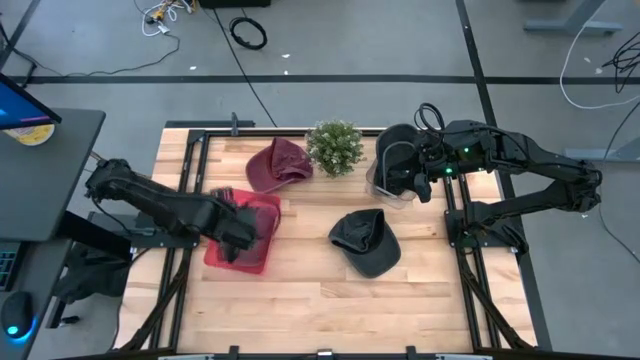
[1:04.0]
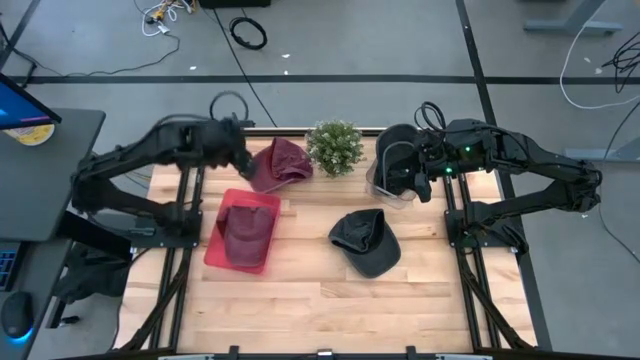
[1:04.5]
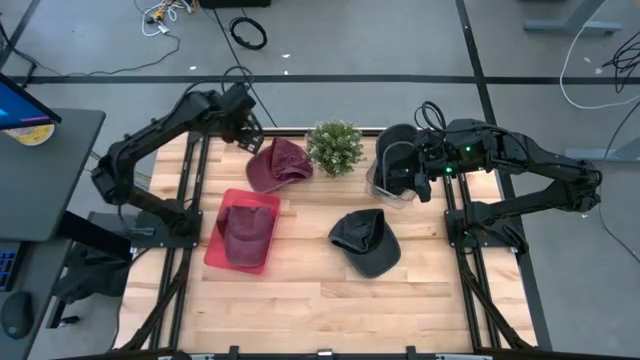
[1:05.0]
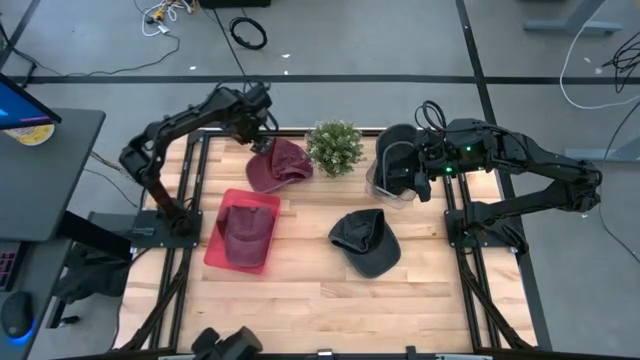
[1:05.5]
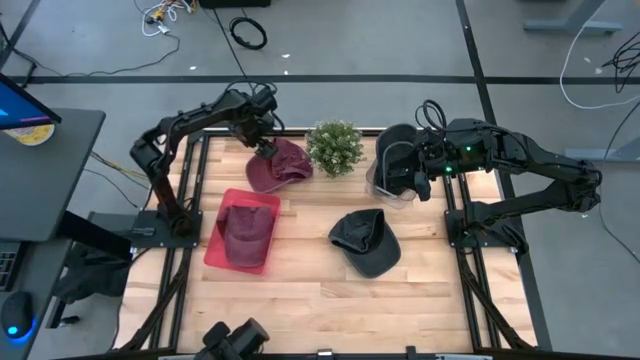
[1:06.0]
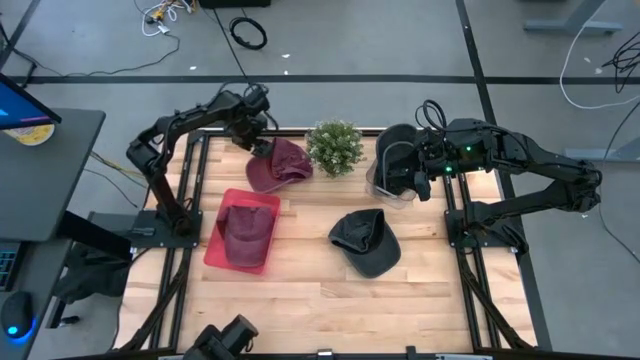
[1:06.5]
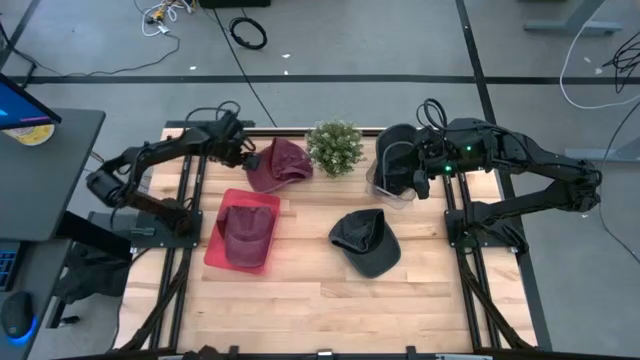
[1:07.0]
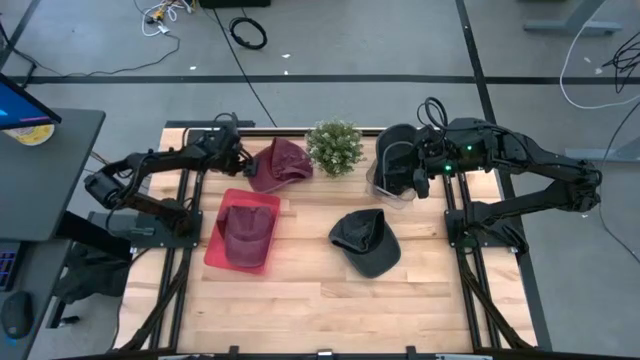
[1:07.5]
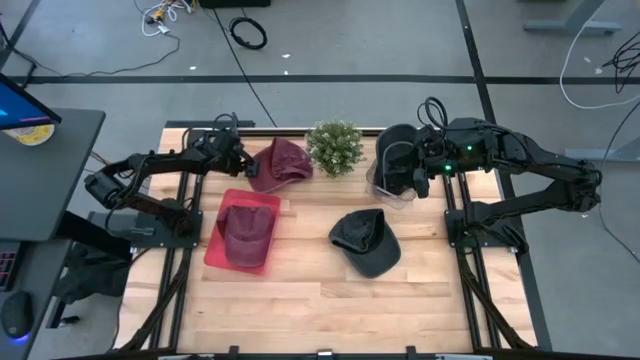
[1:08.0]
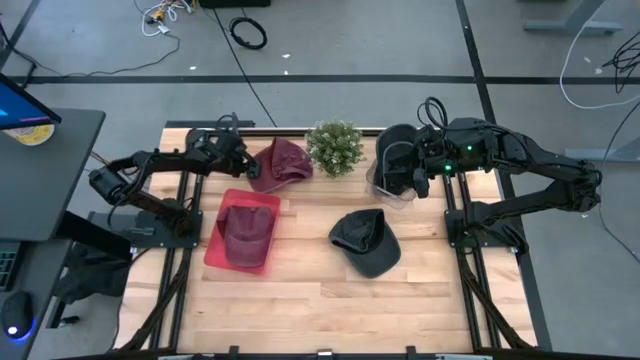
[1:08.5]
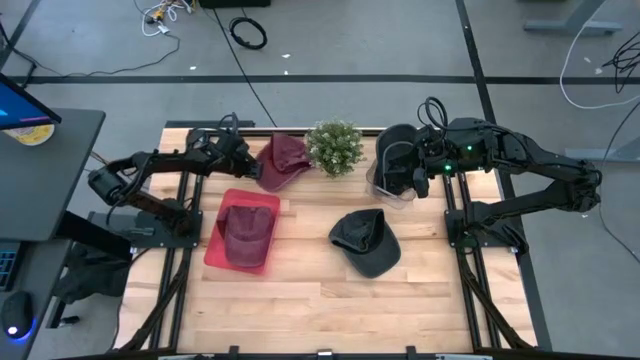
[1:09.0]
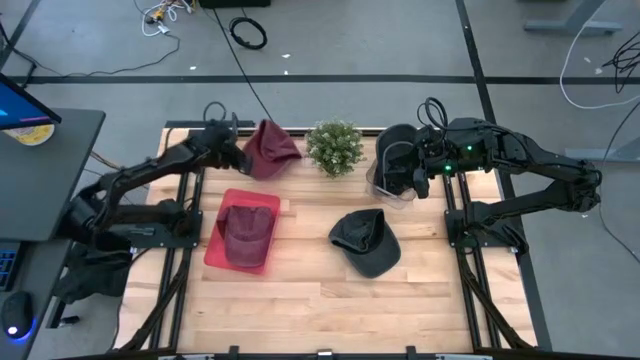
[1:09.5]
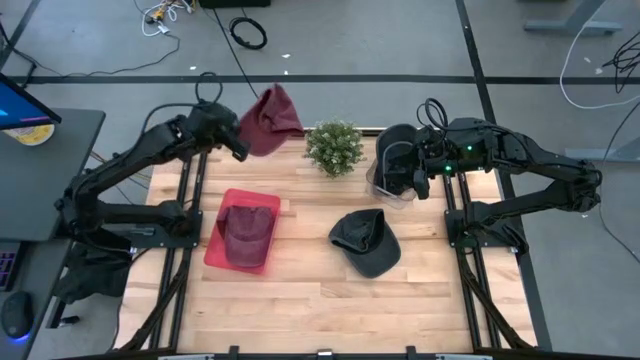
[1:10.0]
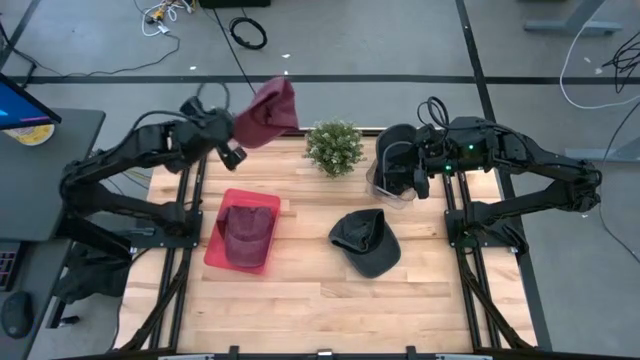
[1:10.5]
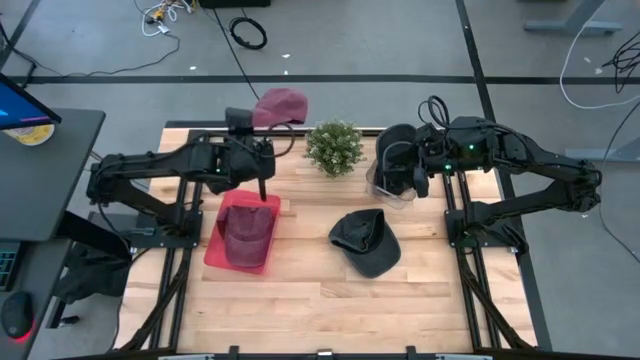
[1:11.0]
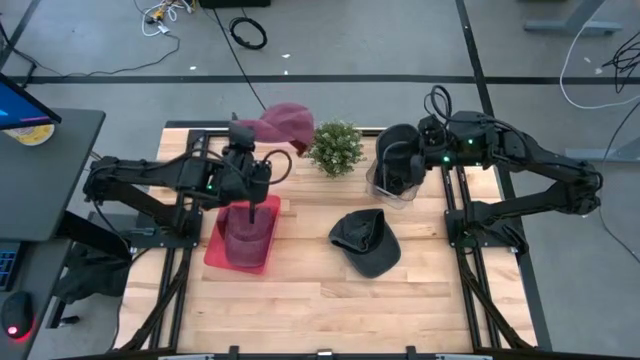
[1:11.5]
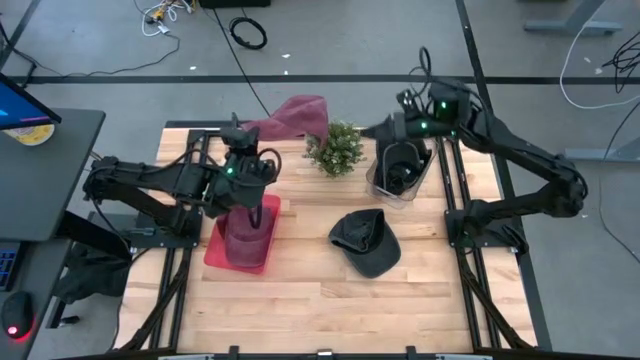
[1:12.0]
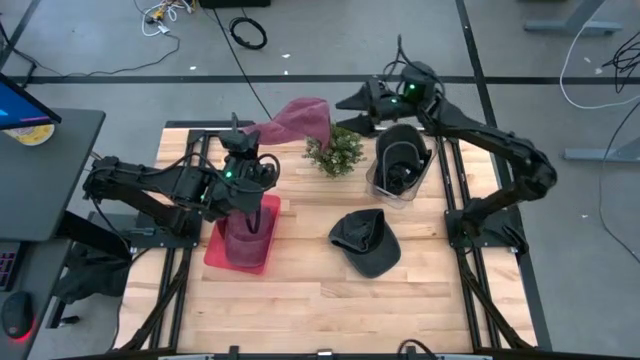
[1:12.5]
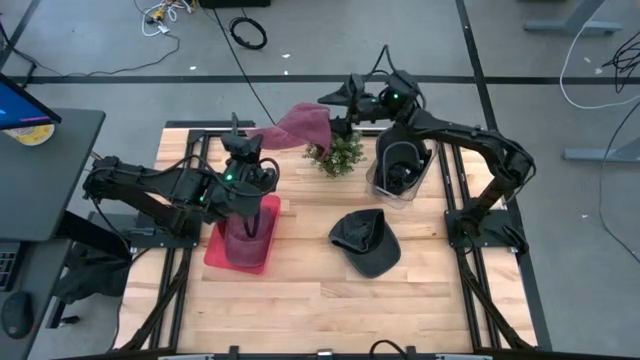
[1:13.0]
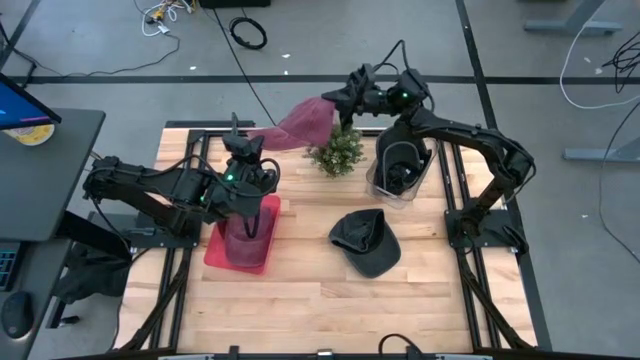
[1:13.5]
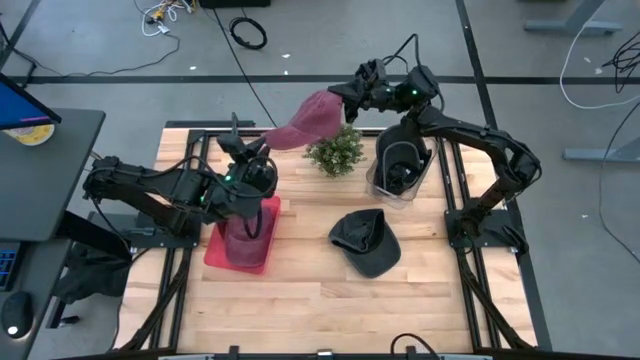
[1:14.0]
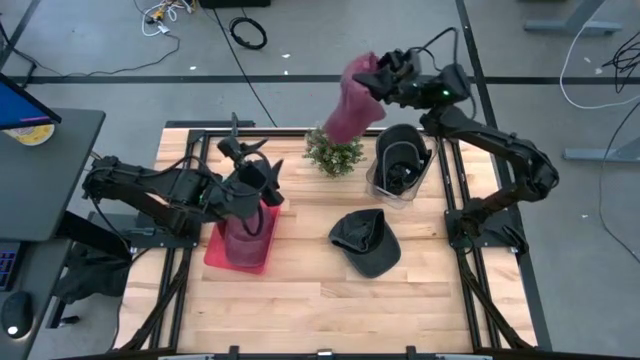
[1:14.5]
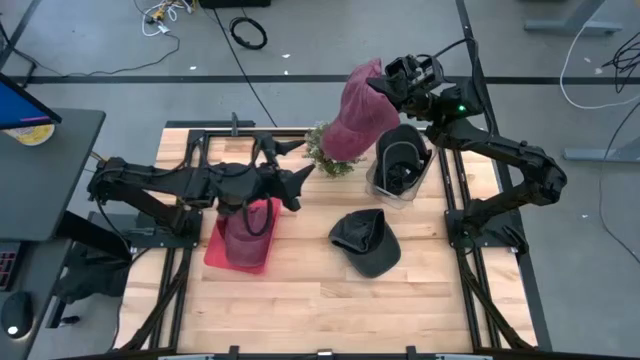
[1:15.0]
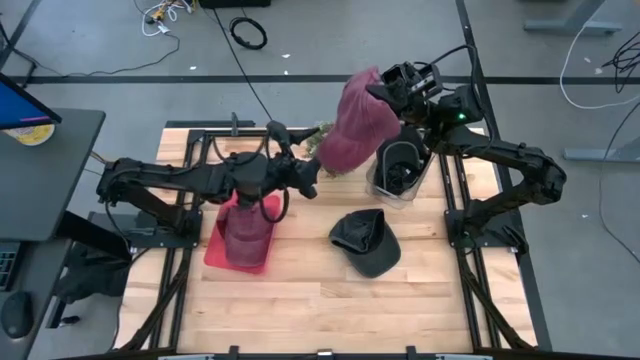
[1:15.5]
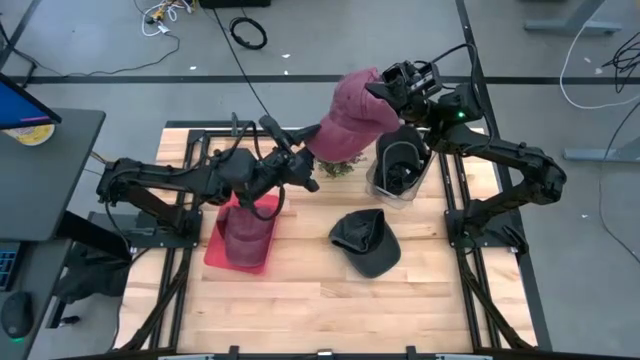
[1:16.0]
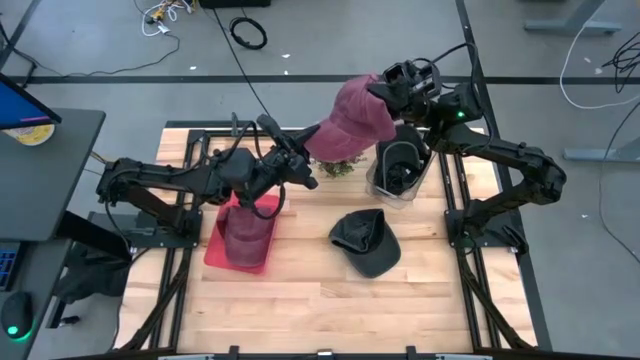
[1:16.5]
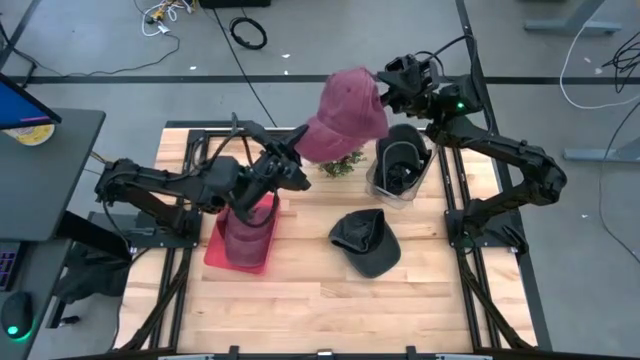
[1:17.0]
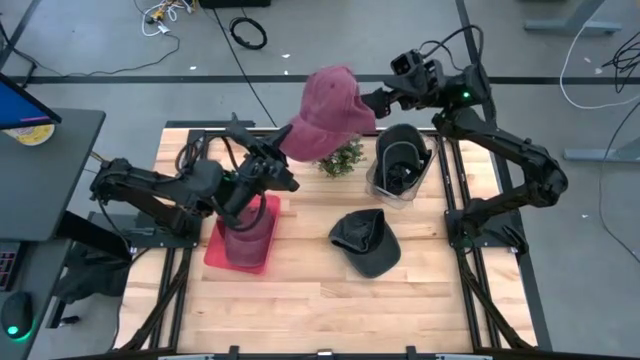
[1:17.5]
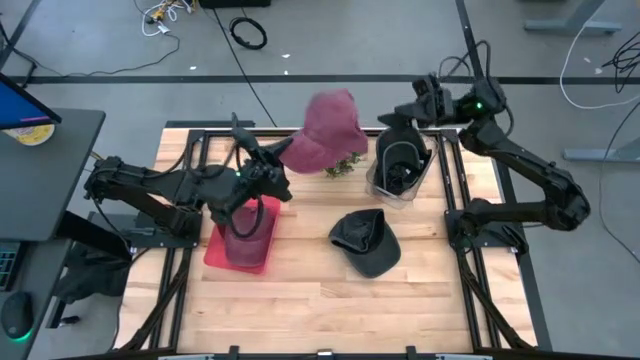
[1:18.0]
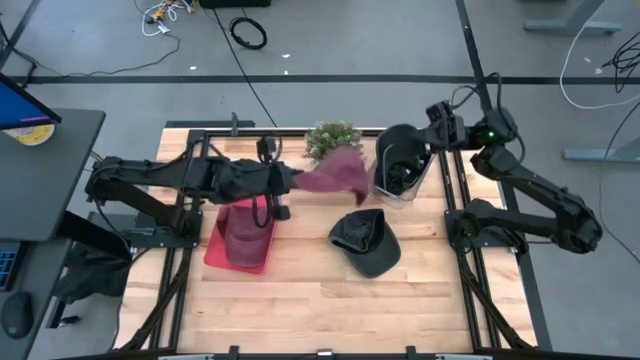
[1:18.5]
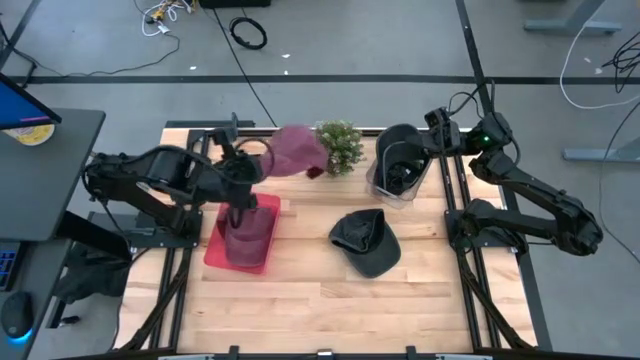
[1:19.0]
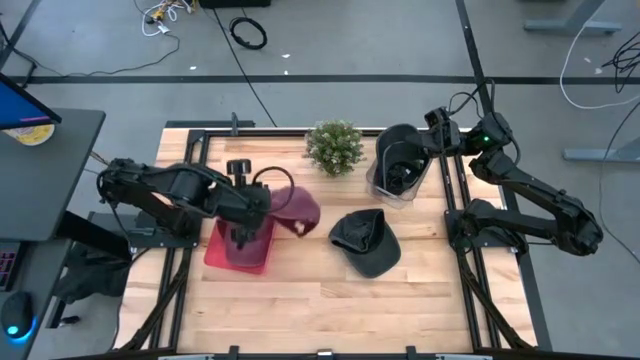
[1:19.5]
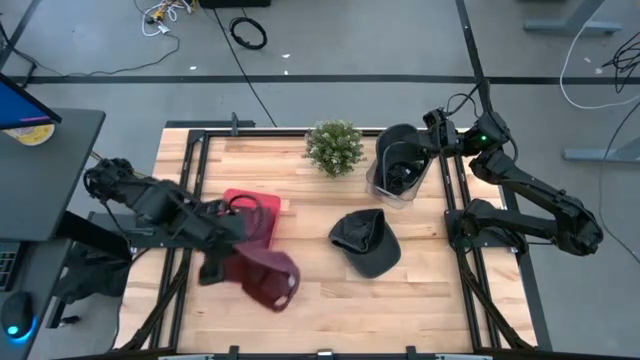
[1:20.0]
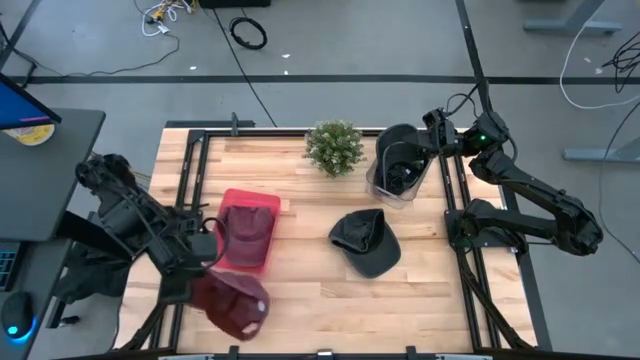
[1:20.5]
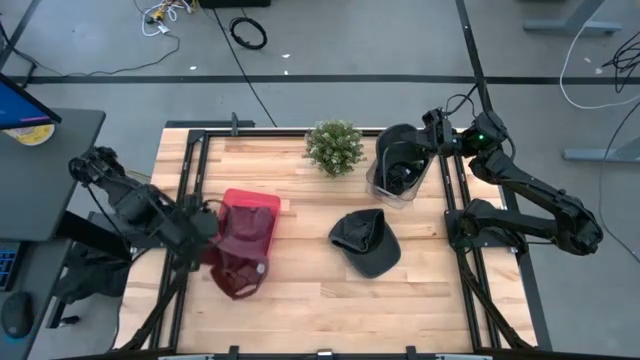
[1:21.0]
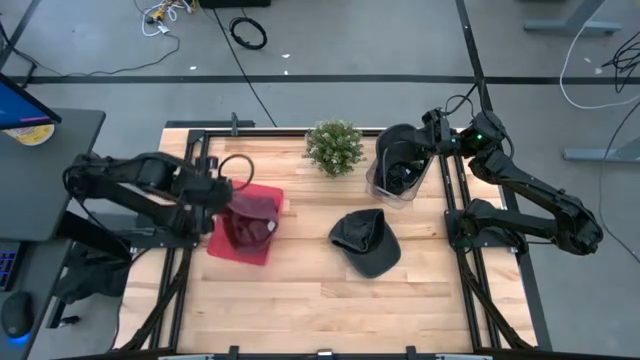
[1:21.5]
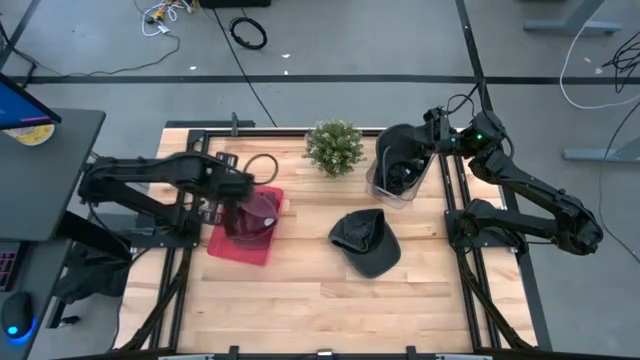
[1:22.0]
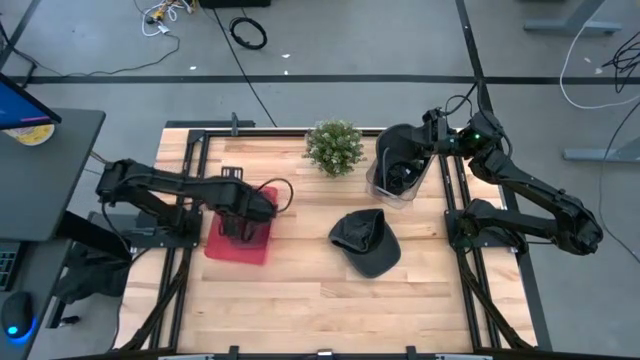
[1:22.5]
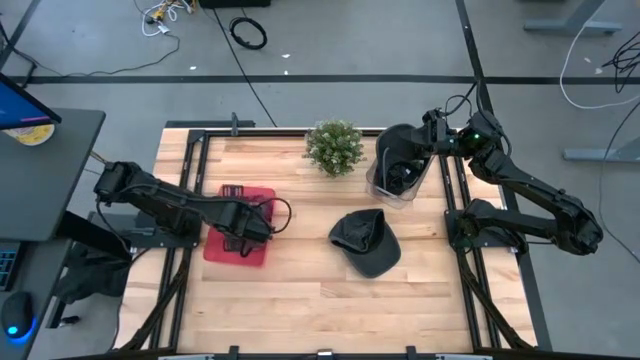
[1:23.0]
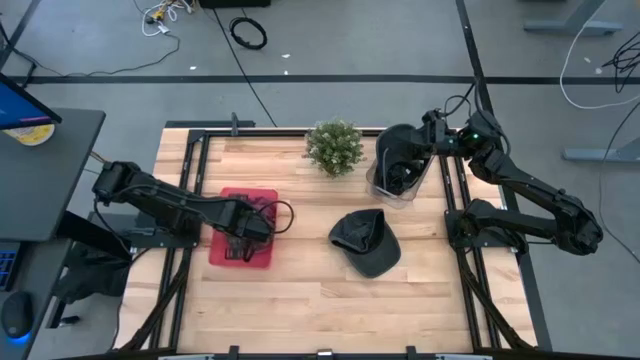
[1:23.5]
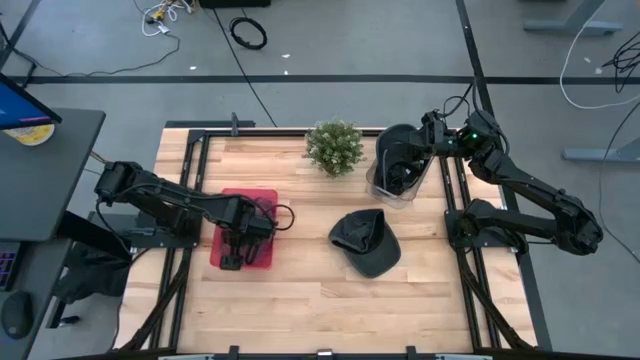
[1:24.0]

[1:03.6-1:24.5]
Task: Pick & Place hat
Put the red cap into the red bin
